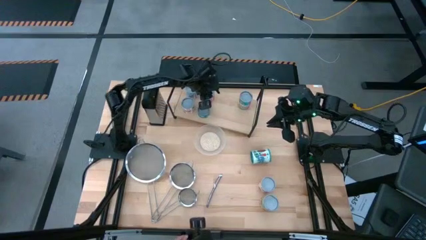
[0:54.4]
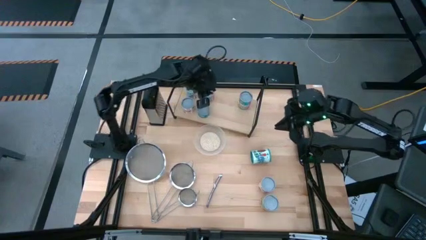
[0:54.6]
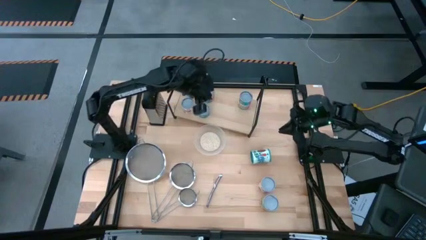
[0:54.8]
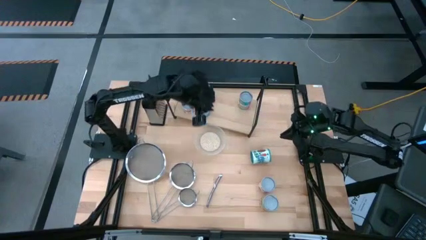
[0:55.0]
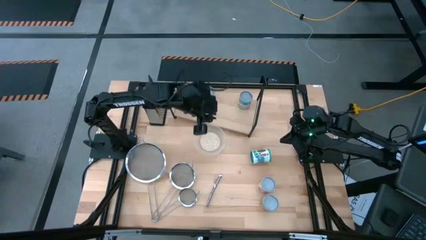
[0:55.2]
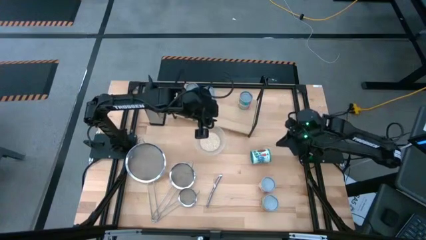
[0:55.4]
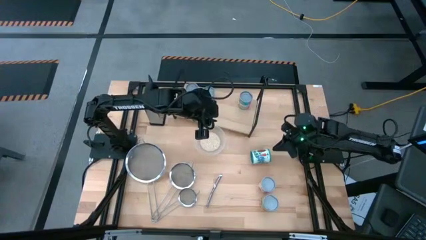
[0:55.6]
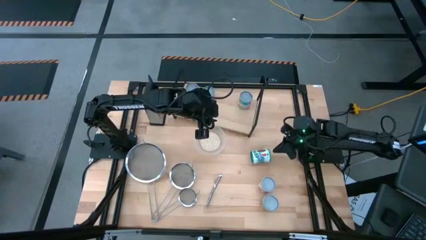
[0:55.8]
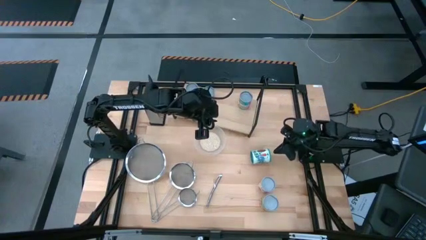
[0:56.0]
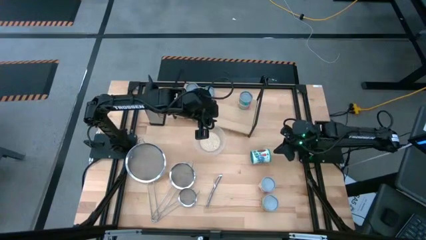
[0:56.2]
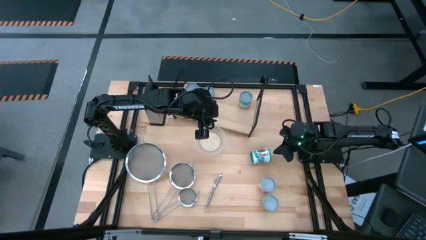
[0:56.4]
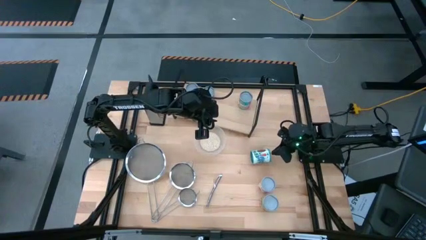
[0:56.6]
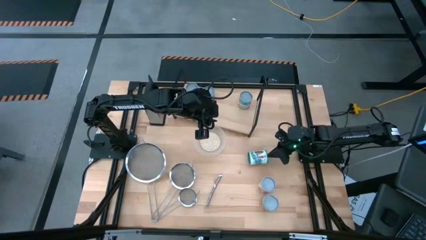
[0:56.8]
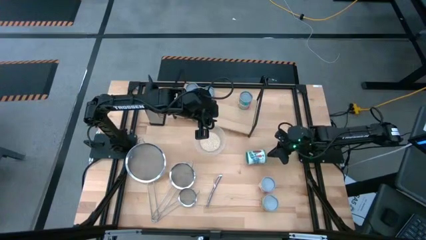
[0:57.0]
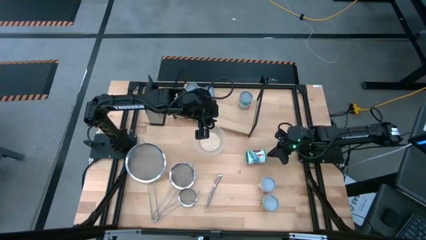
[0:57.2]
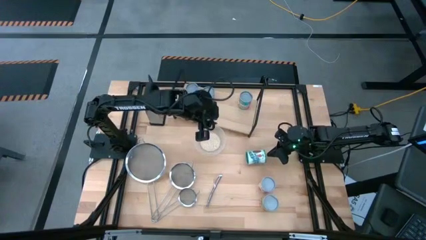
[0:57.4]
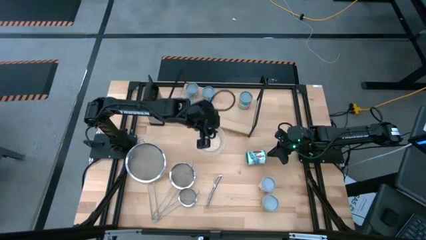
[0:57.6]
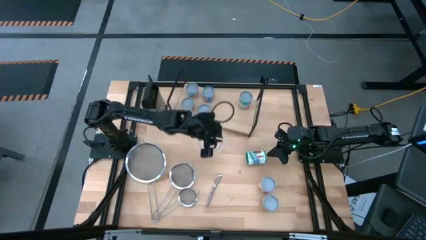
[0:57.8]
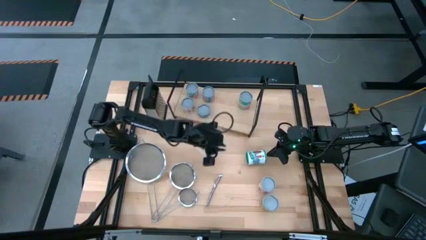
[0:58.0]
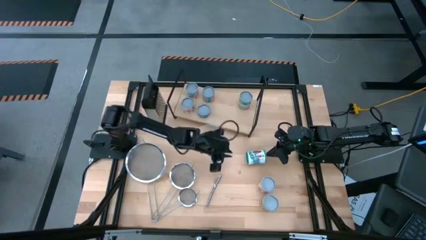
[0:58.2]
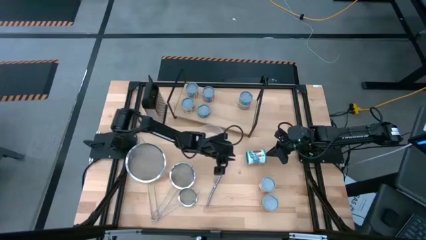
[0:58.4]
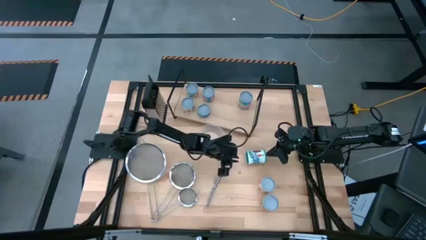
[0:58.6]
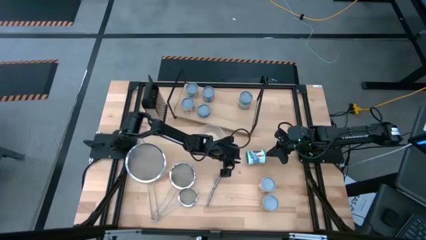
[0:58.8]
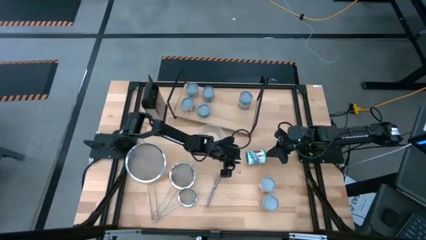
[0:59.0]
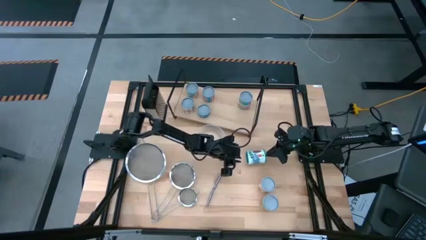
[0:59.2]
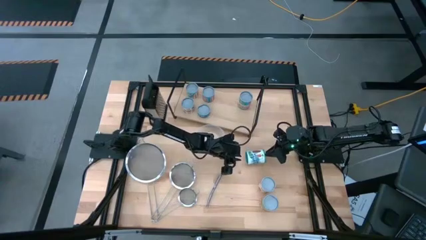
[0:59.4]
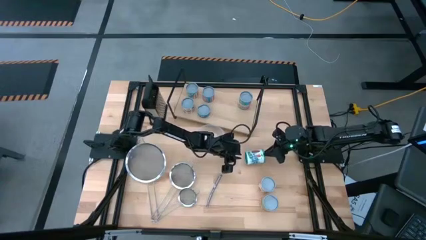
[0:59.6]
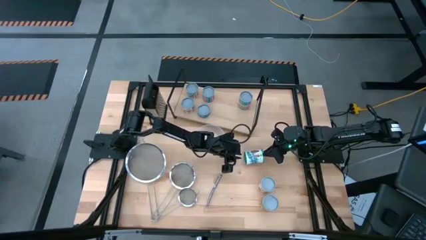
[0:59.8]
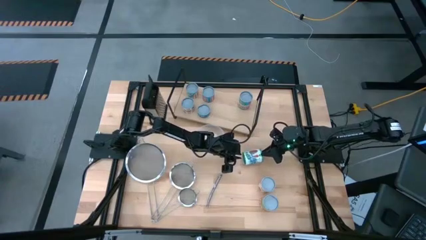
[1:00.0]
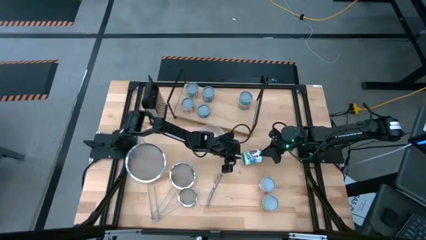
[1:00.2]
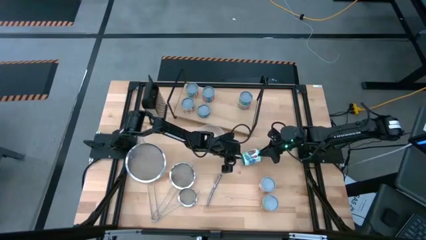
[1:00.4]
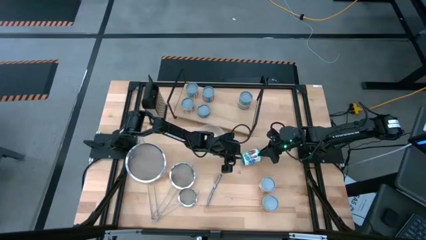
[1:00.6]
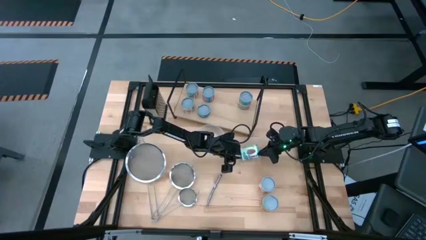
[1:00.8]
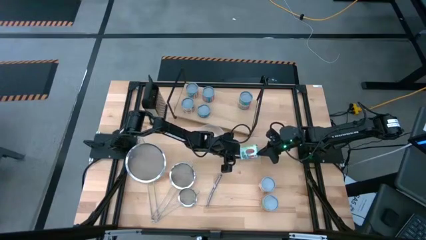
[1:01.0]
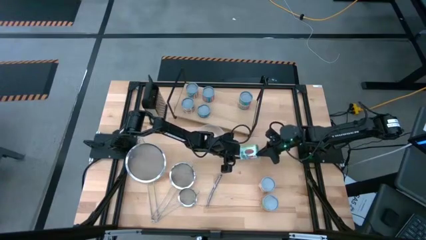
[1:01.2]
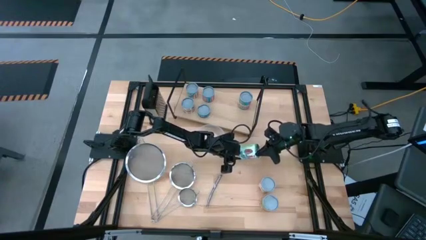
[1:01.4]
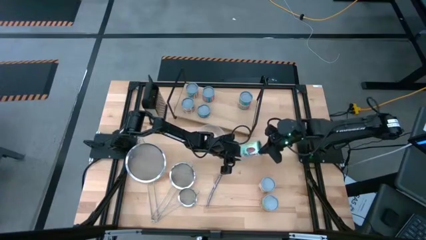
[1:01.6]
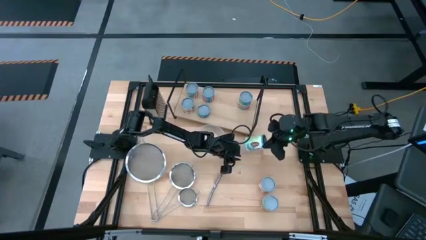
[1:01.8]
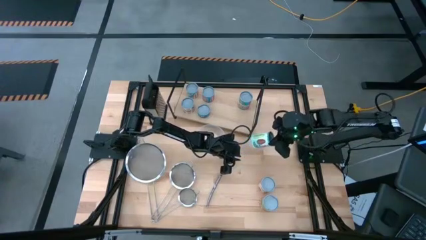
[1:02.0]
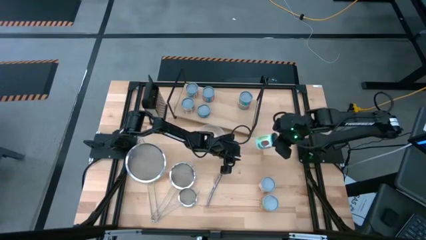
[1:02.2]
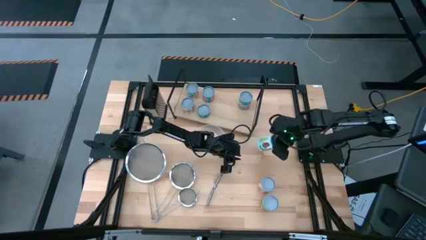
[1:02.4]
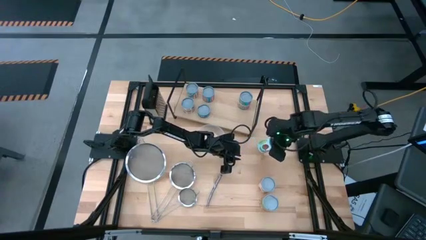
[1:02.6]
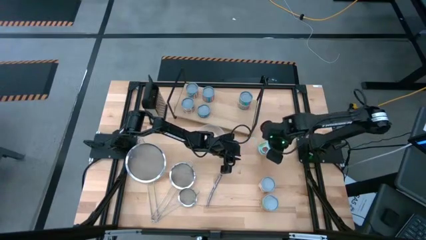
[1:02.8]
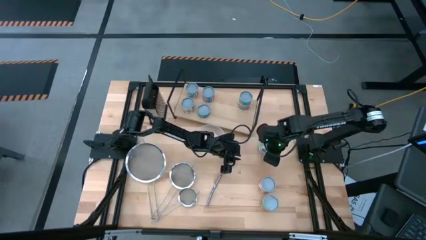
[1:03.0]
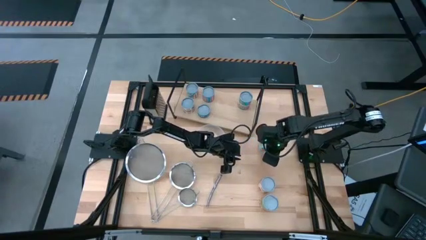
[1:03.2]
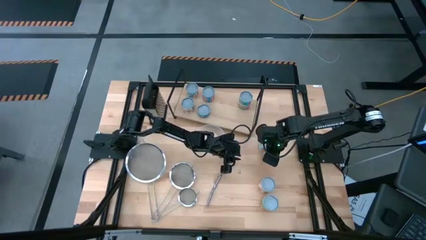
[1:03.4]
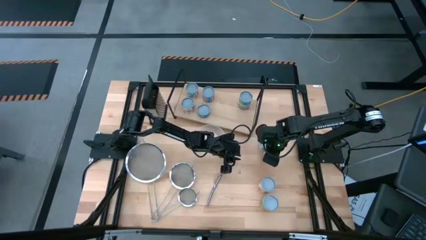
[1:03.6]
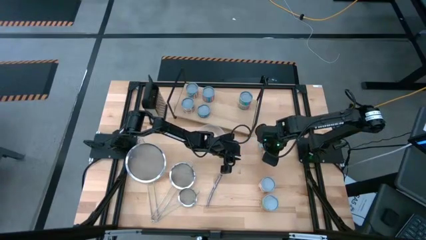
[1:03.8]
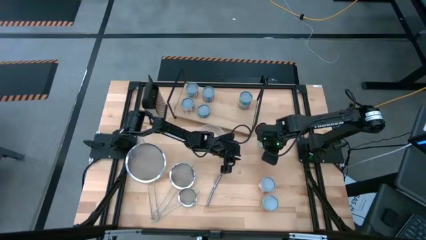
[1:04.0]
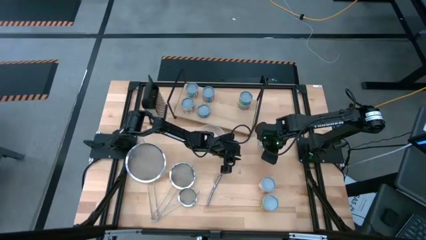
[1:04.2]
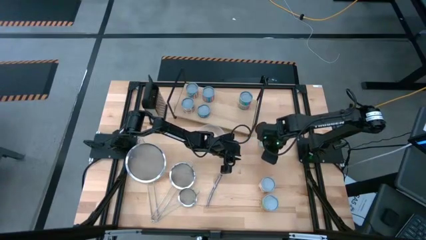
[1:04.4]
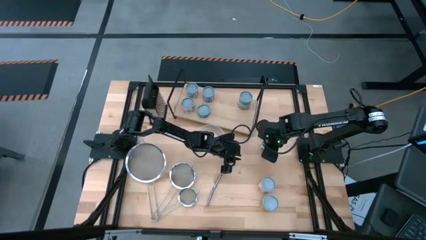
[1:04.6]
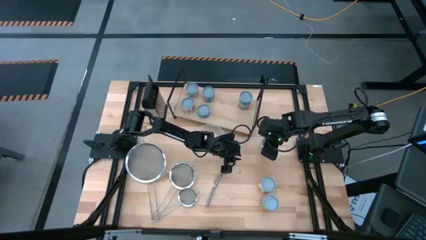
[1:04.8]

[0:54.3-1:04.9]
Task: Pick and place cans onto a shelf
Put the canned mixed vegetables on the shelf

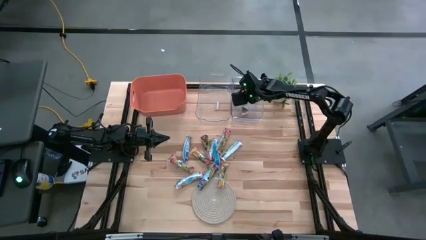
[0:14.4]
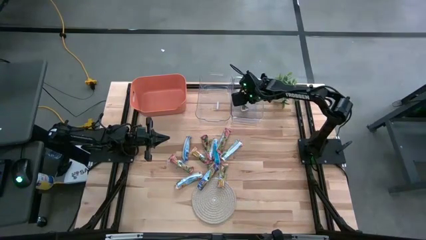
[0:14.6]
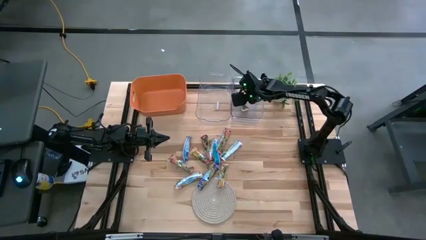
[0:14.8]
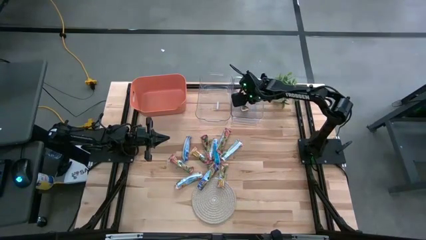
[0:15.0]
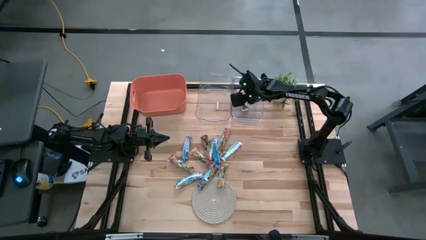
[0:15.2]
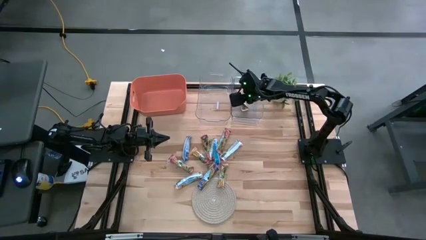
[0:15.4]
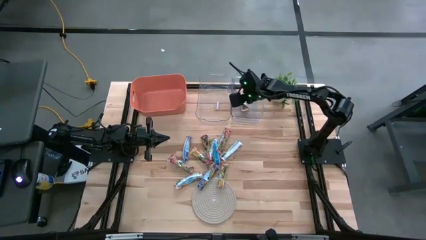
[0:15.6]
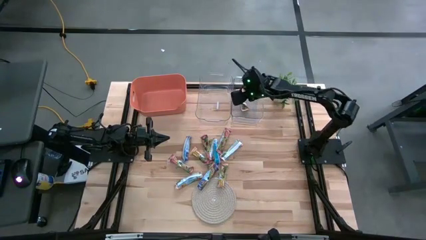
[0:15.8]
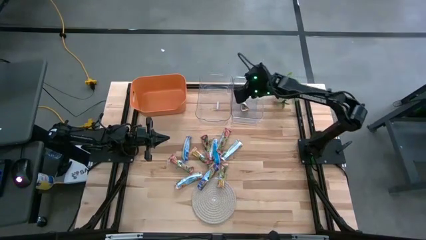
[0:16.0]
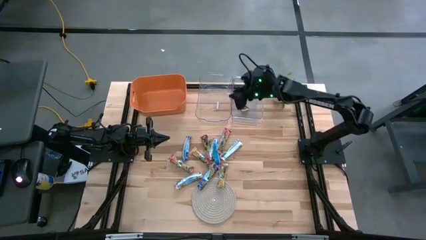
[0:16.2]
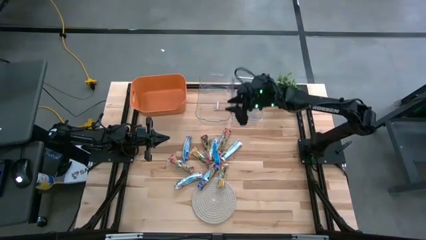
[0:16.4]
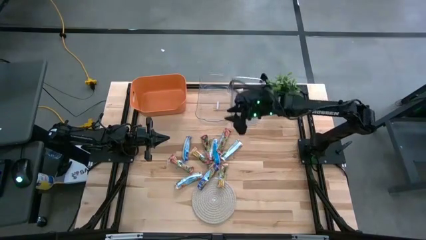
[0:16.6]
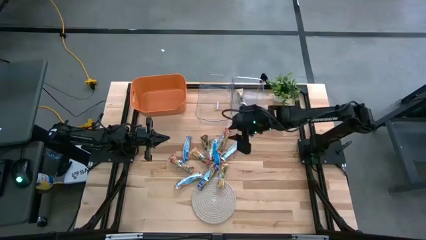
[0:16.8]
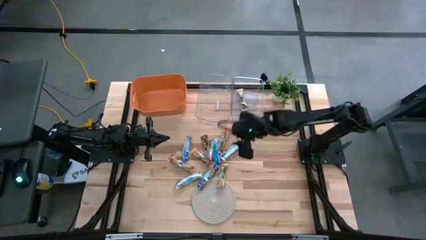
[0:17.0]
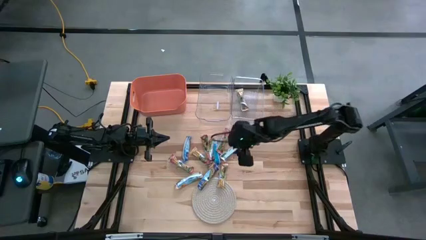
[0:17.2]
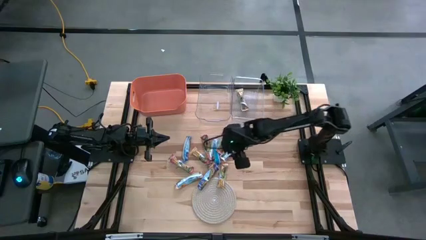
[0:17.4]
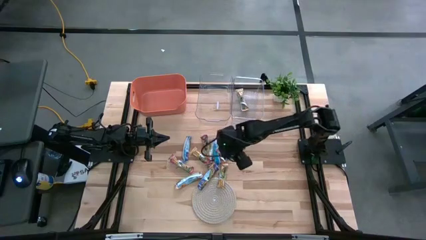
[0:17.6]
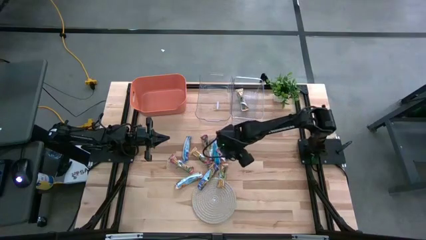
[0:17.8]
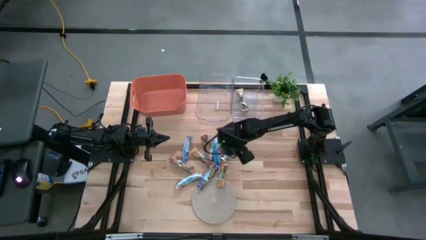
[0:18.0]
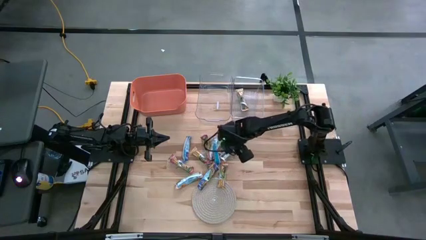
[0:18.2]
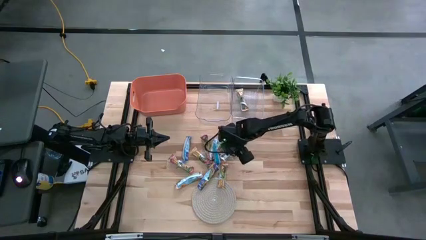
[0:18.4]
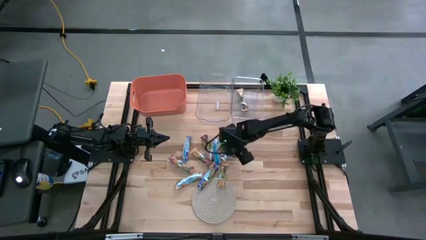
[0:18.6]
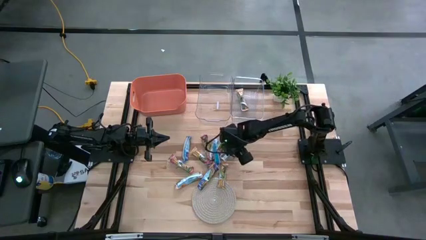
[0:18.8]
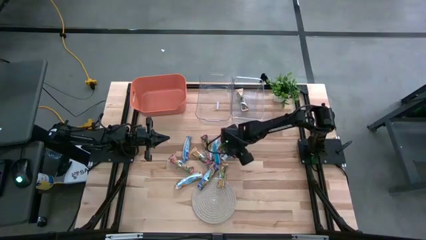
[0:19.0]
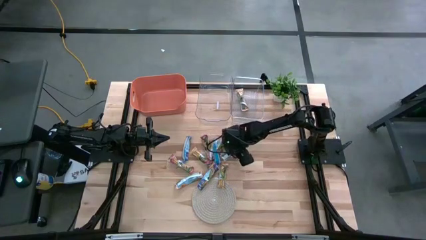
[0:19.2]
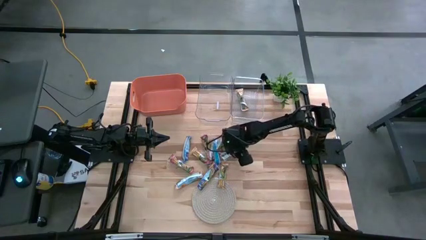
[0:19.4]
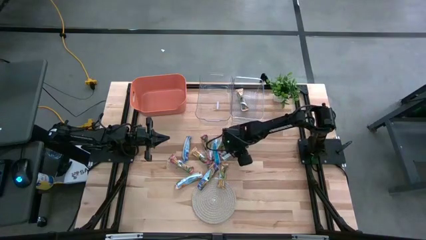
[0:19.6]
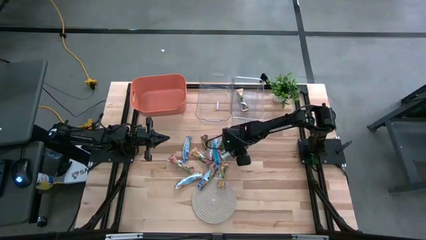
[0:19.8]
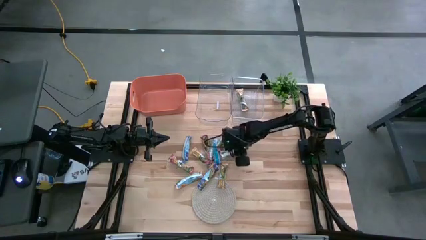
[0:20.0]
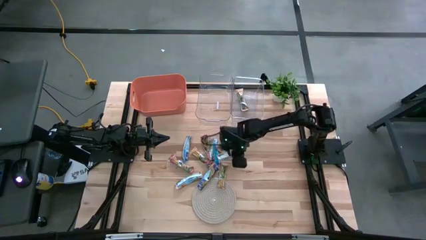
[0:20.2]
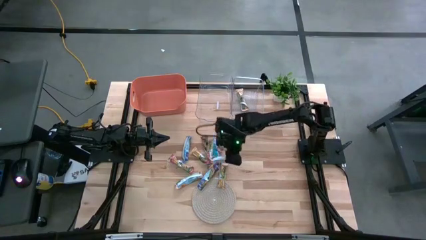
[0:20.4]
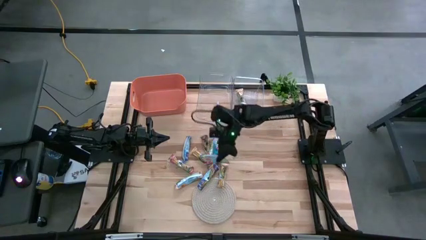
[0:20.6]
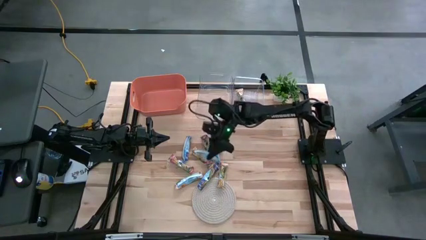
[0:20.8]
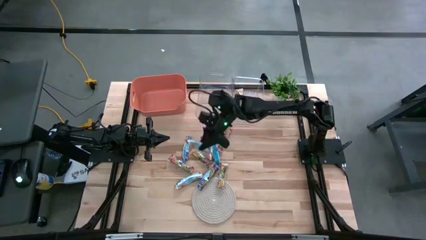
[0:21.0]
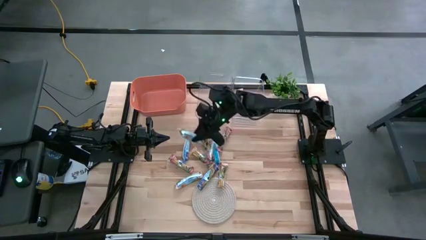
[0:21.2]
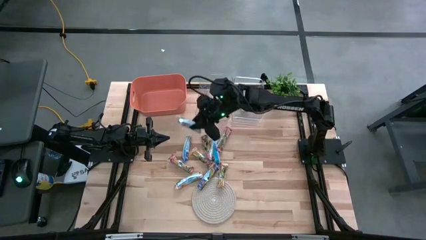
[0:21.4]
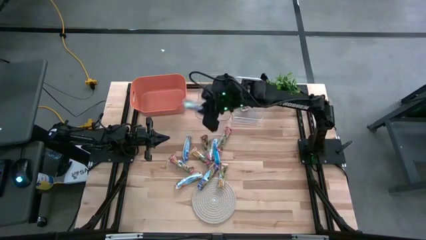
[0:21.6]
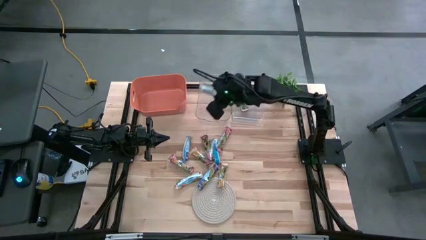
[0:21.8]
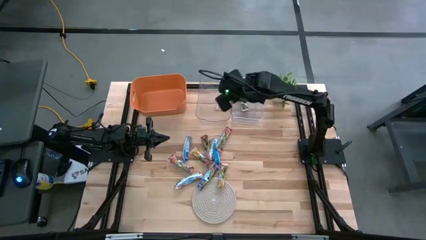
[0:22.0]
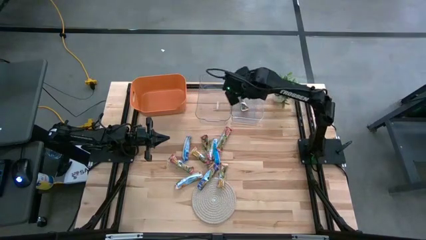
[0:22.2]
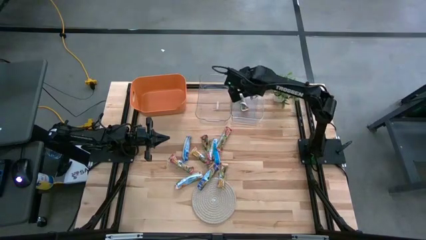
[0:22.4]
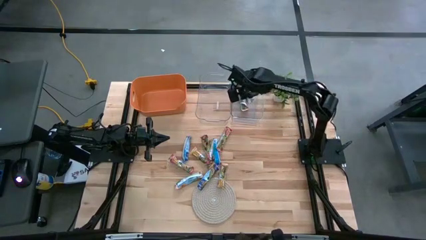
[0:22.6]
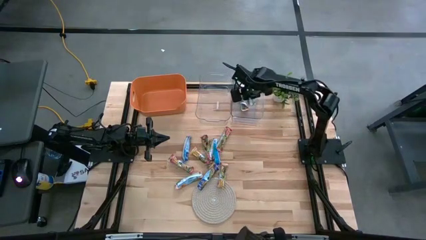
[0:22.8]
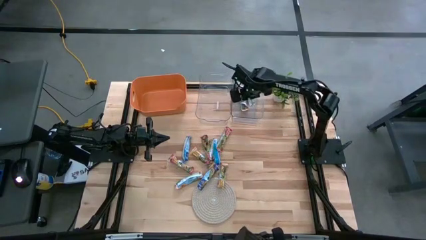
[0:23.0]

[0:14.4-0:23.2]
Task: Pick and place Granola Bars by type
Put the yellow granola bar into the right transparent bin
